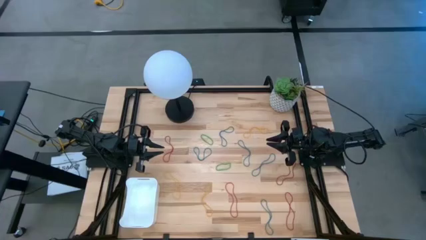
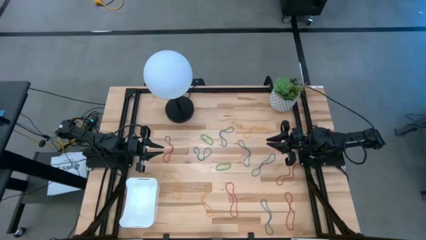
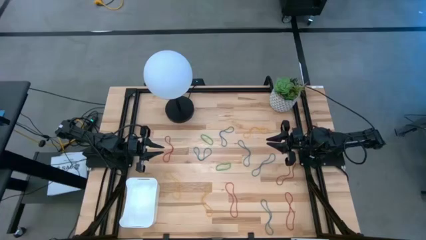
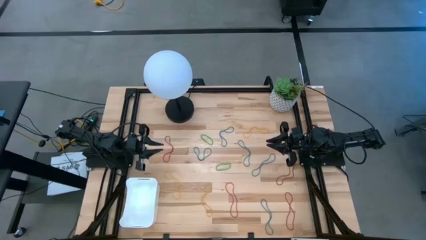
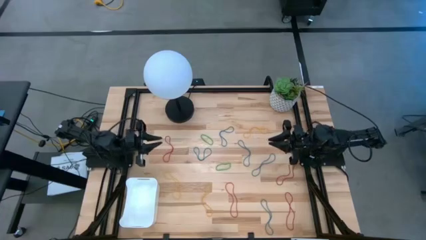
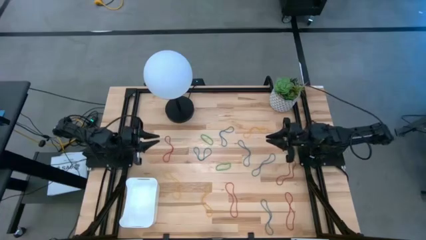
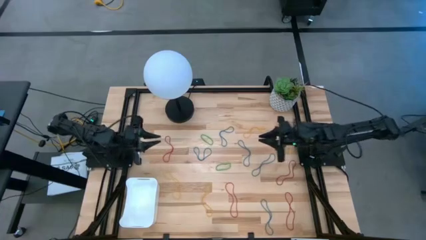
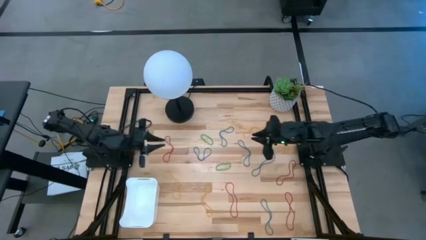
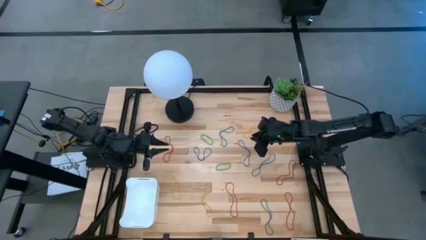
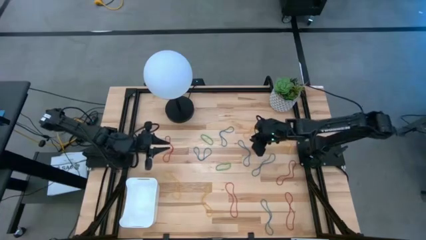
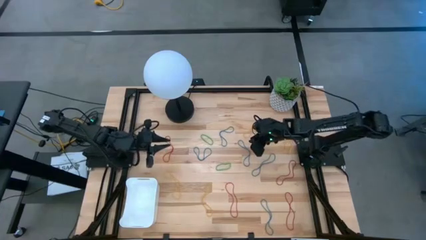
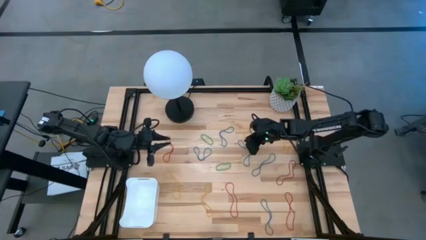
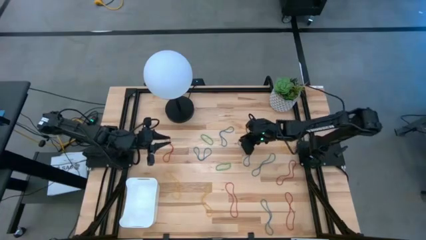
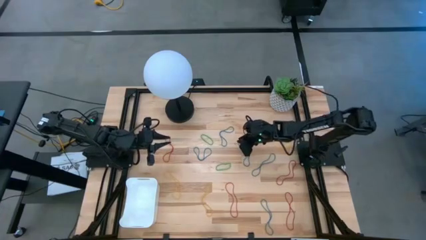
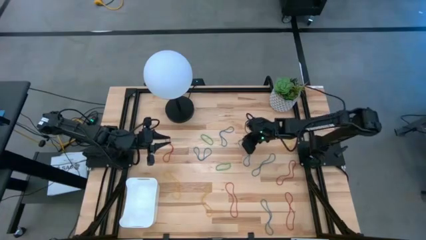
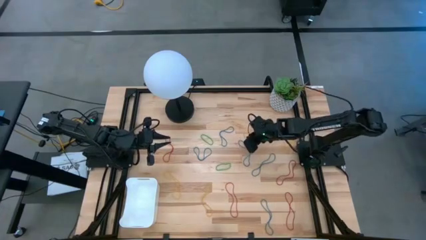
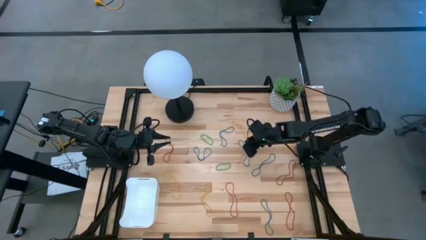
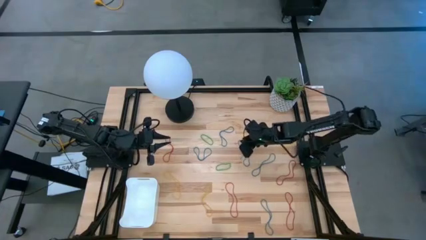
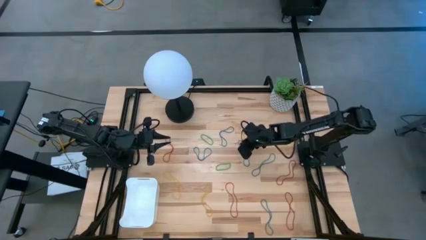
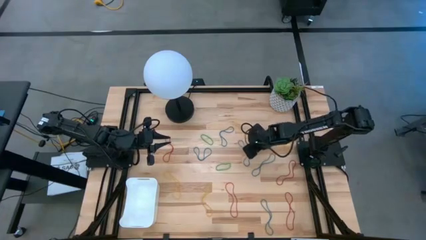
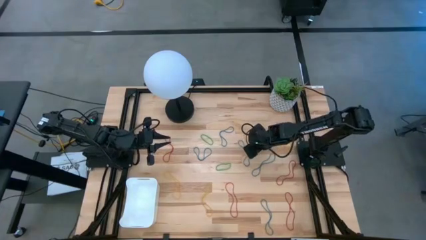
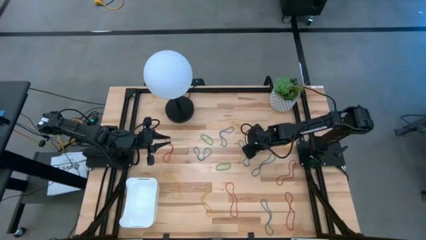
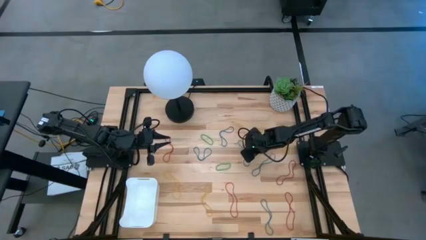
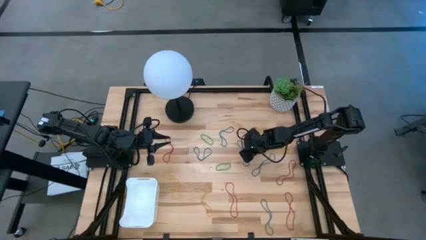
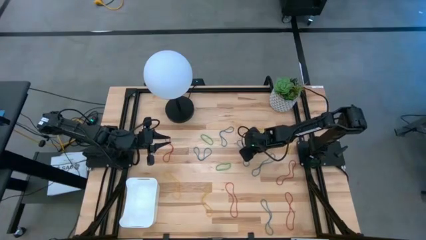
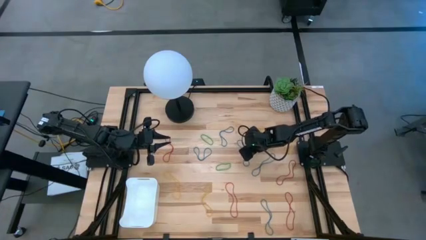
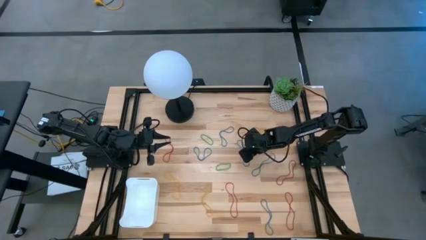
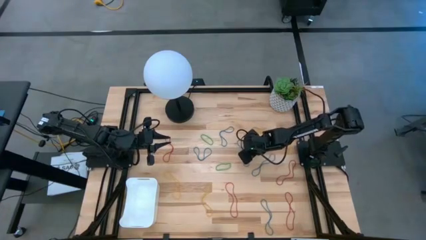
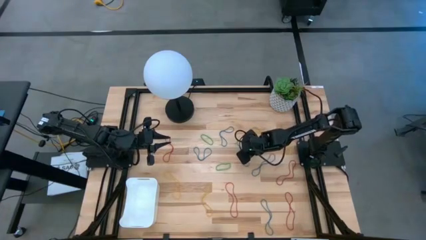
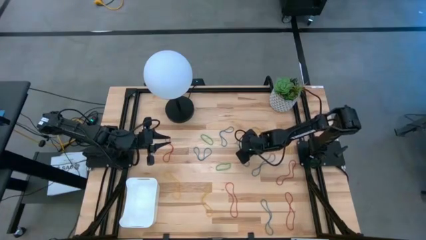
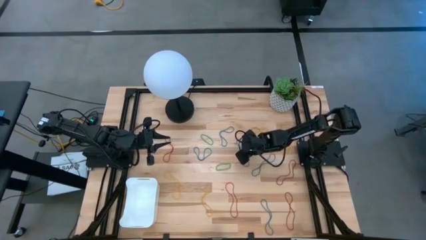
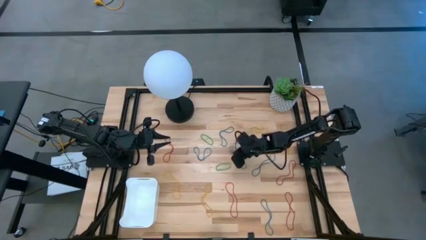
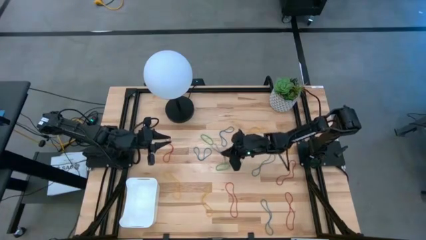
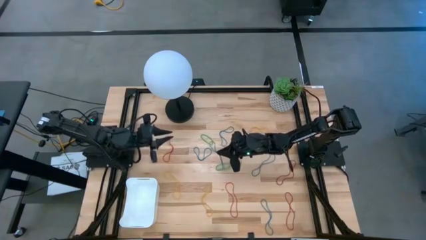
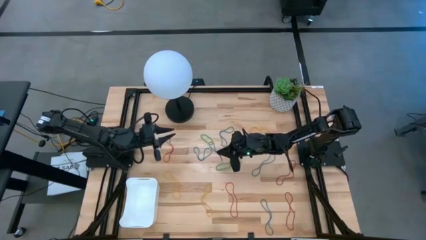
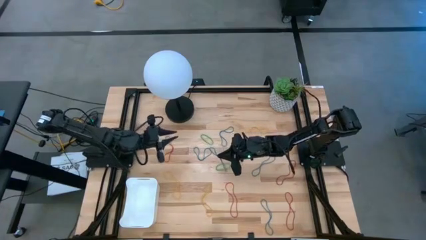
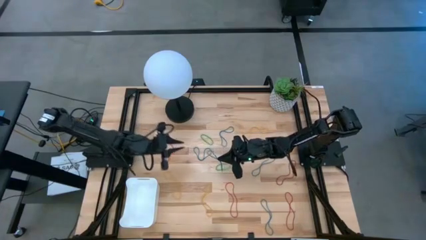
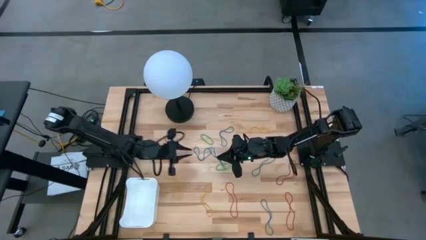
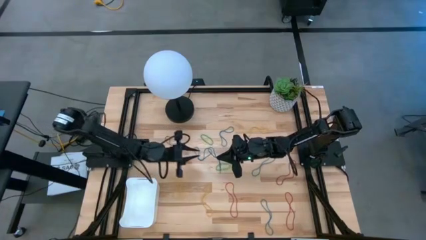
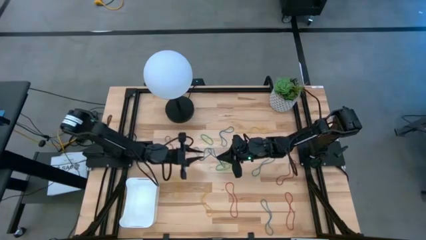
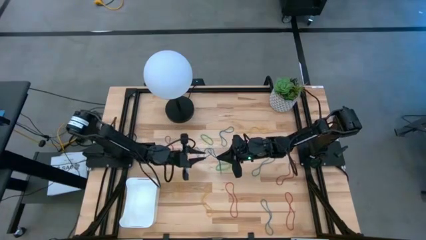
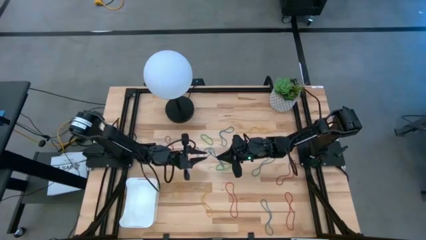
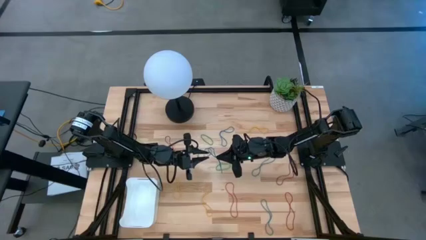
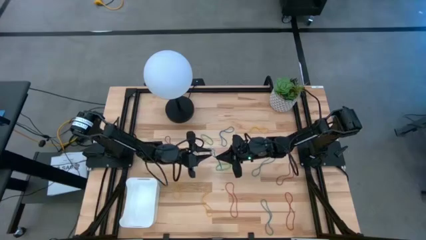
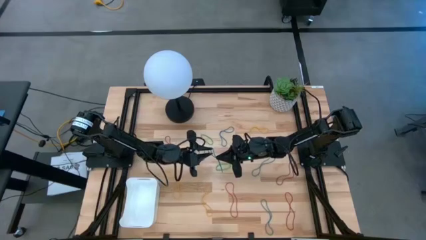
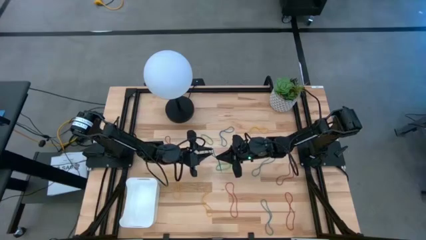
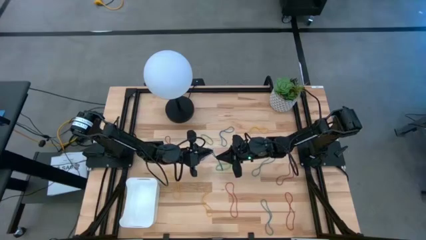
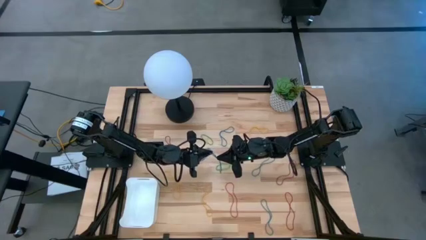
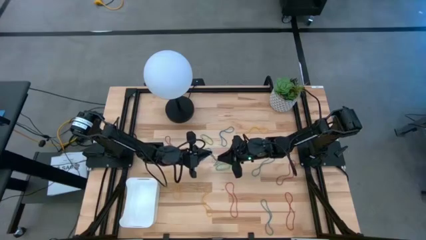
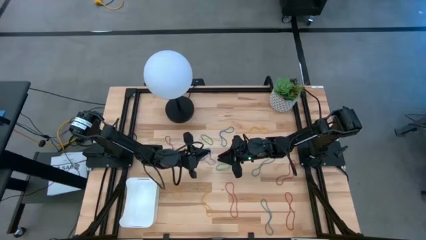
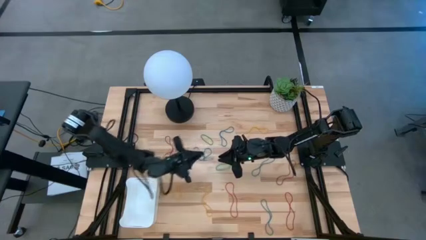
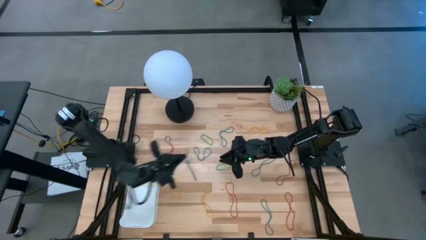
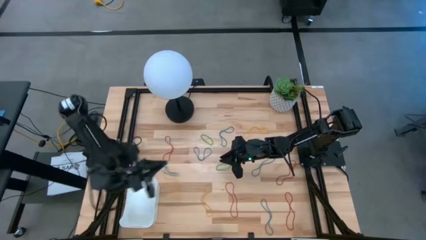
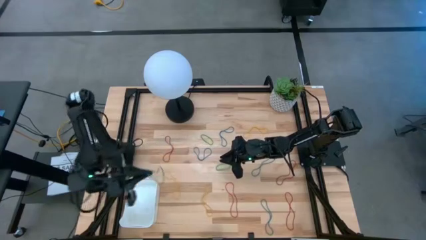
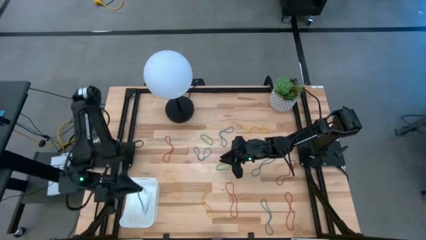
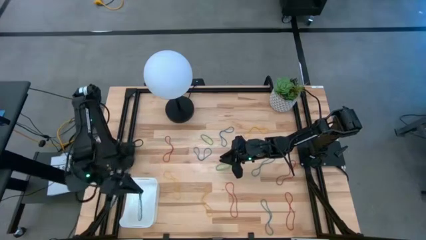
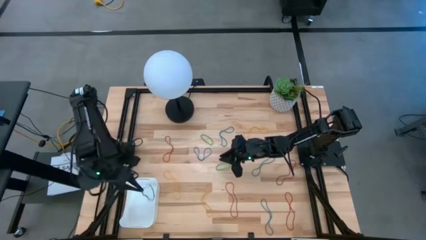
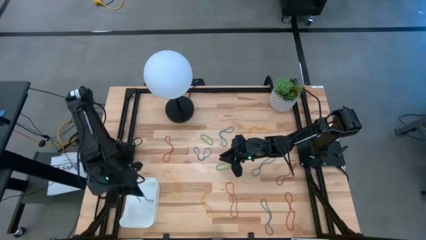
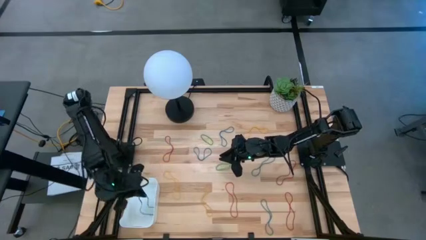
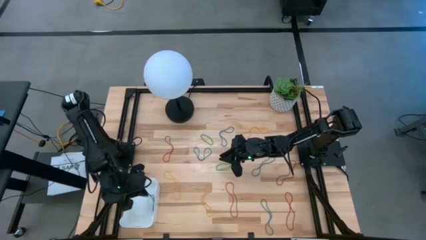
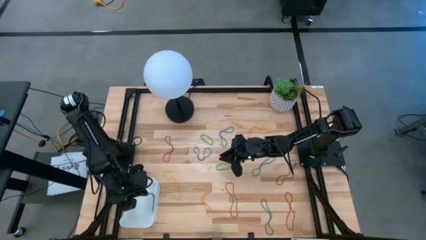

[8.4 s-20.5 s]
Task: Pick and place items into bin
Put the blue rubber band into the white bin

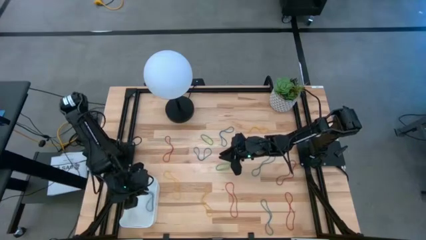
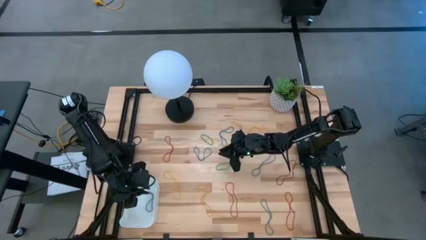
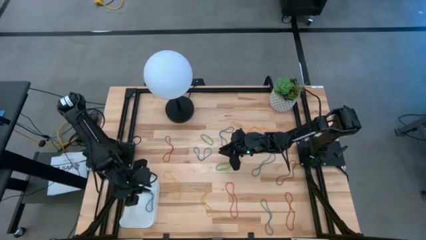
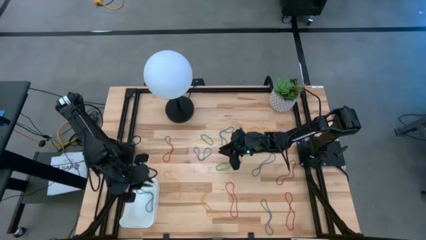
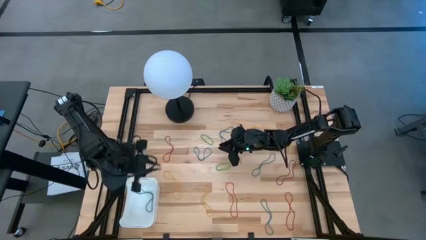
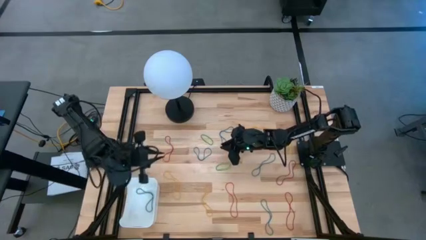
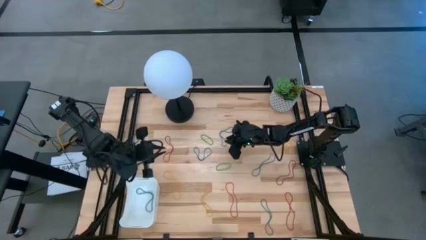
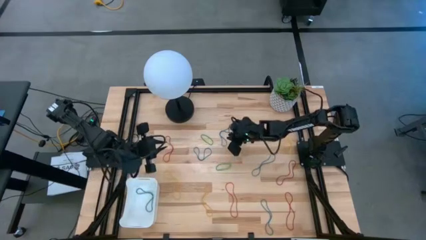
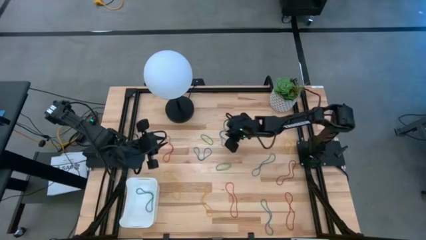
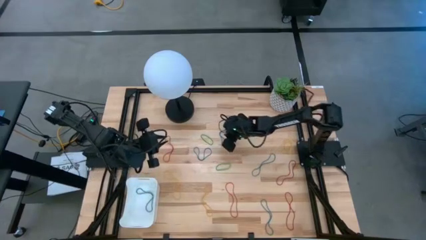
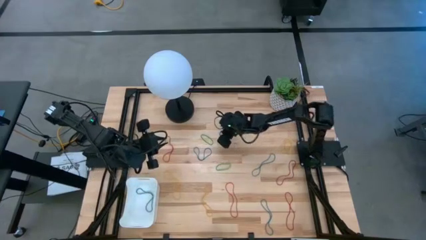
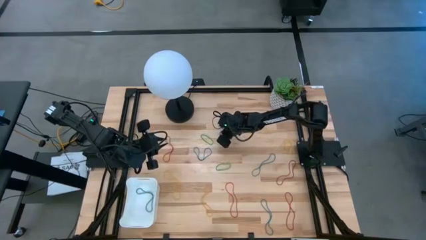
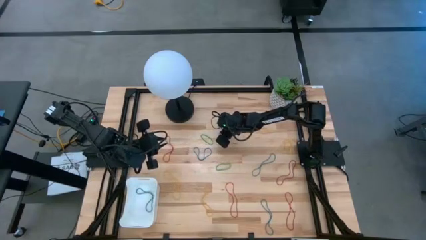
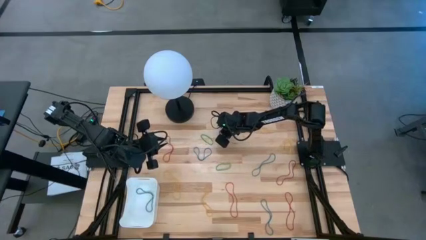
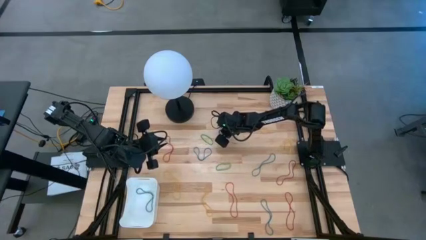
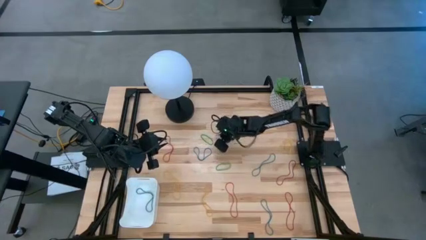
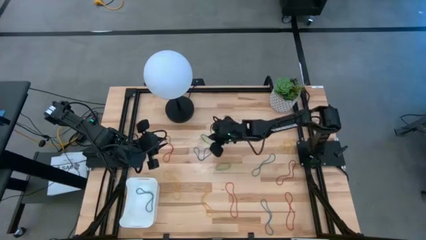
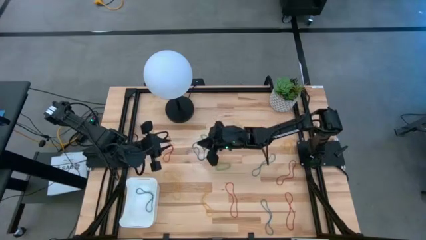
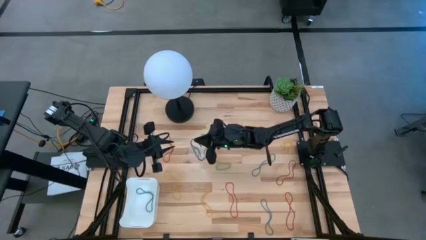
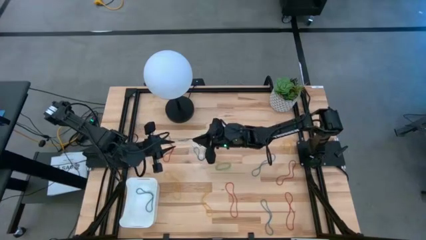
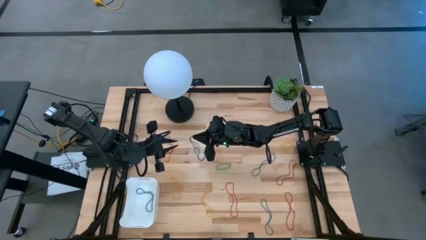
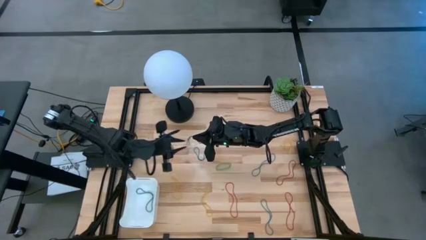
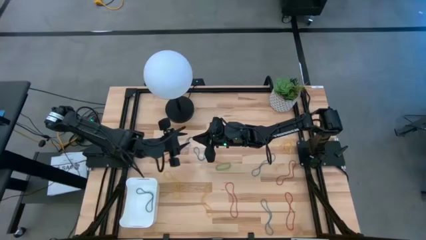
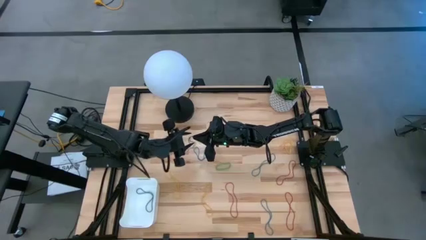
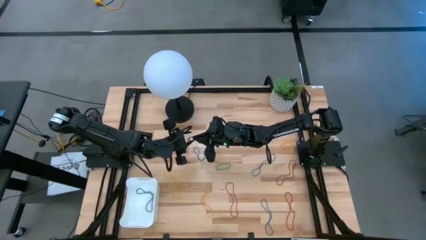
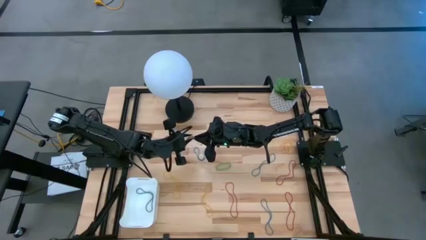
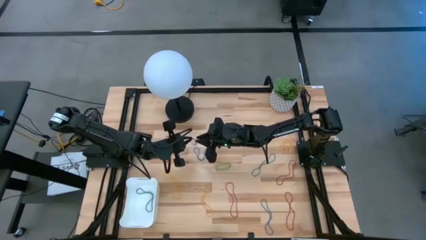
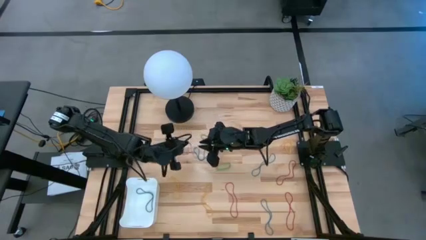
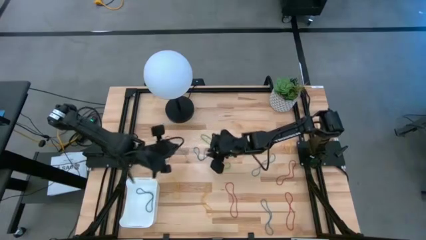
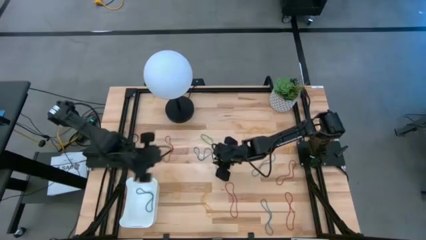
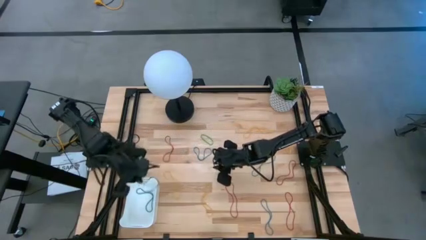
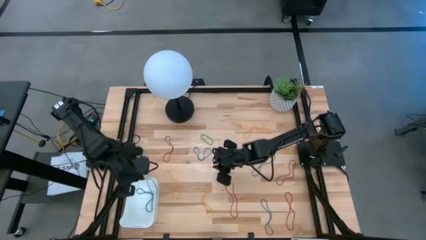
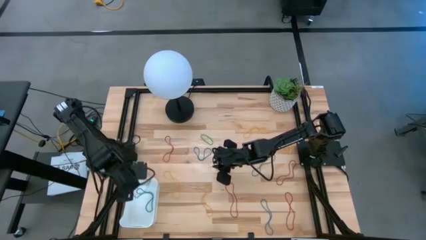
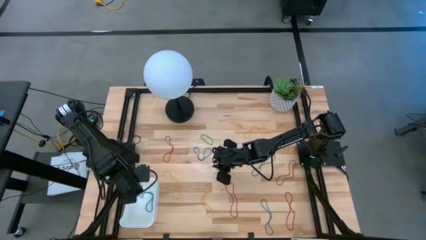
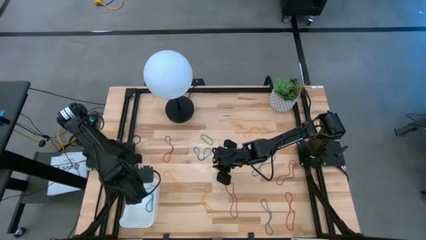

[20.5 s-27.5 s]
Put the blue rubber band into the white bin
